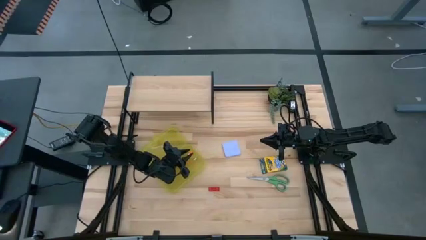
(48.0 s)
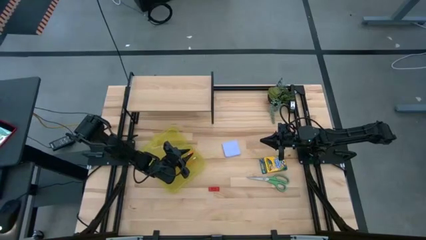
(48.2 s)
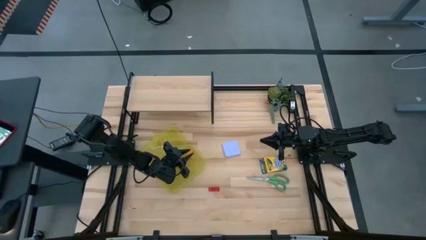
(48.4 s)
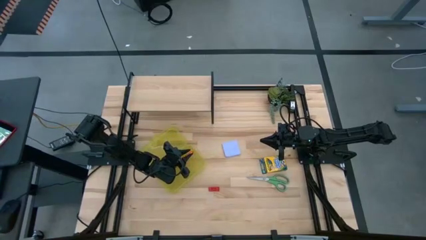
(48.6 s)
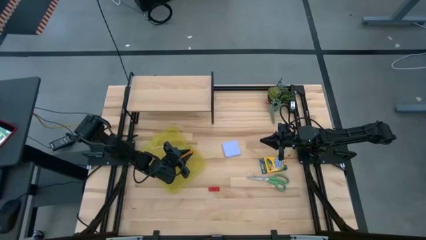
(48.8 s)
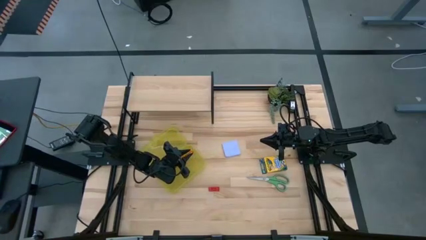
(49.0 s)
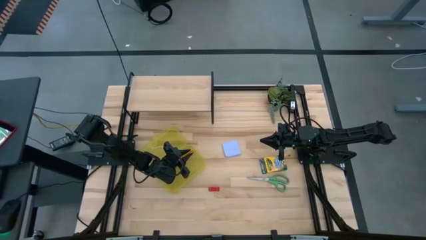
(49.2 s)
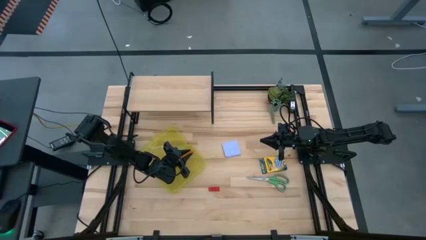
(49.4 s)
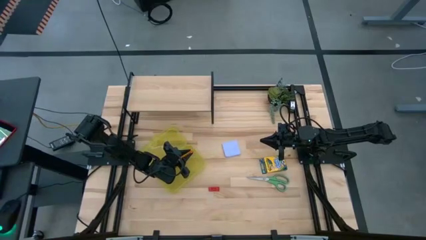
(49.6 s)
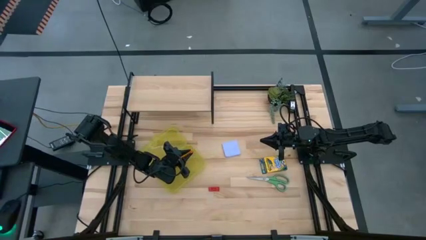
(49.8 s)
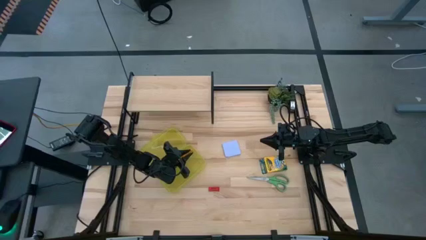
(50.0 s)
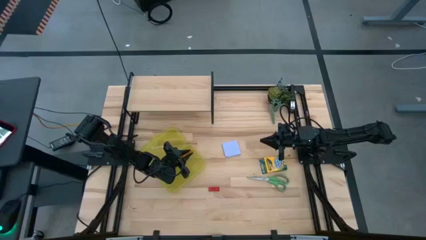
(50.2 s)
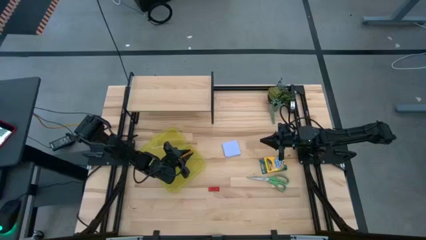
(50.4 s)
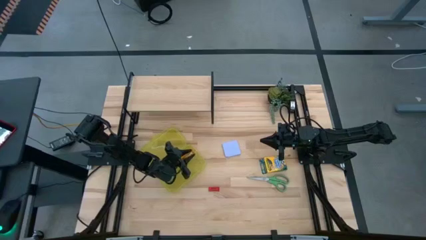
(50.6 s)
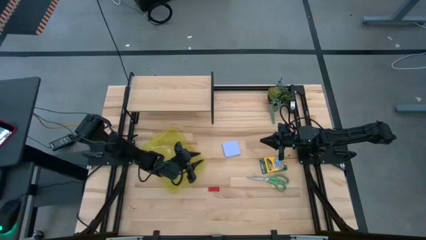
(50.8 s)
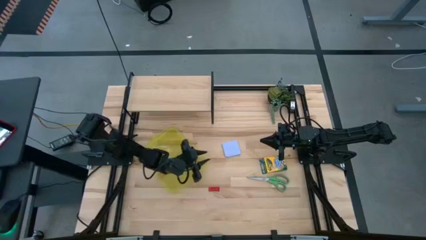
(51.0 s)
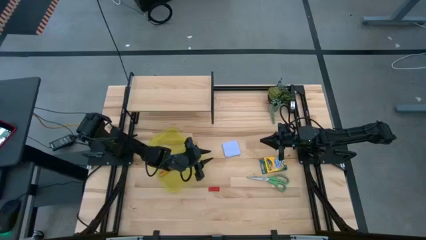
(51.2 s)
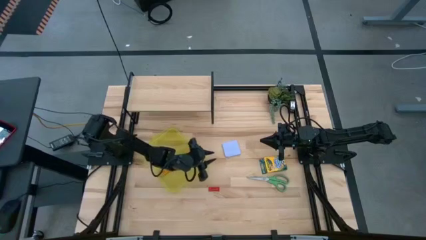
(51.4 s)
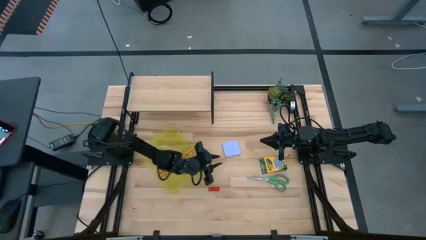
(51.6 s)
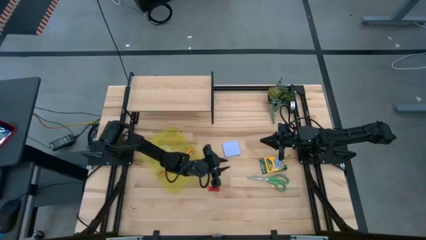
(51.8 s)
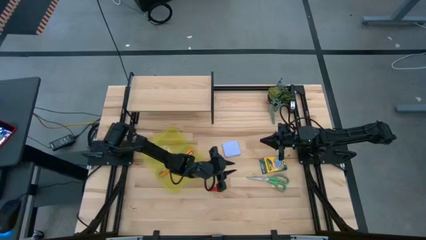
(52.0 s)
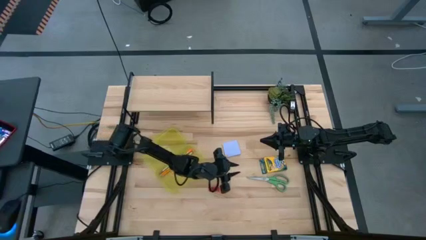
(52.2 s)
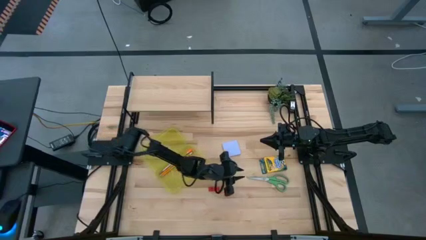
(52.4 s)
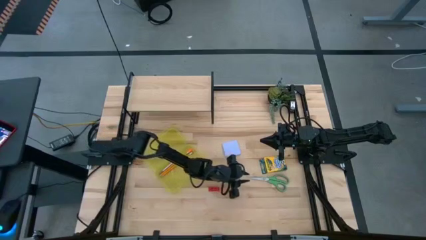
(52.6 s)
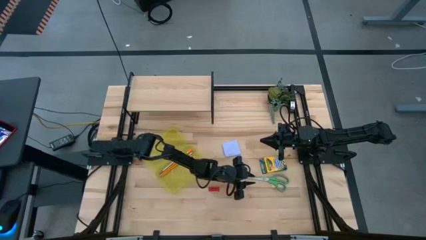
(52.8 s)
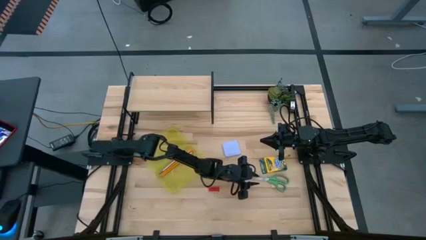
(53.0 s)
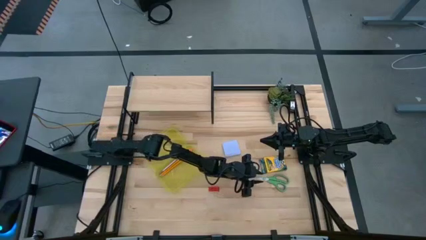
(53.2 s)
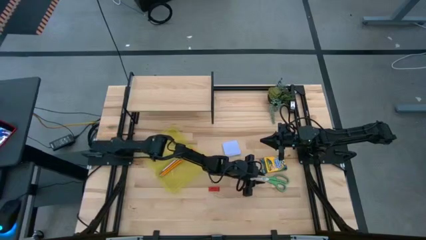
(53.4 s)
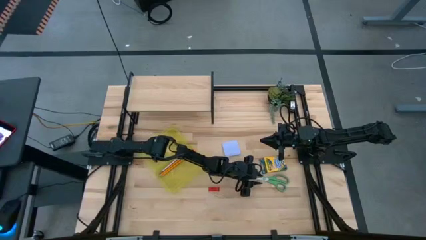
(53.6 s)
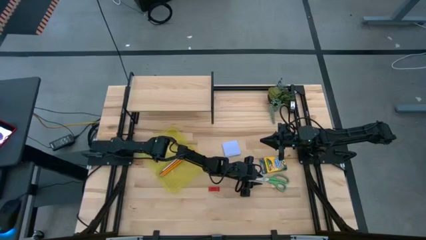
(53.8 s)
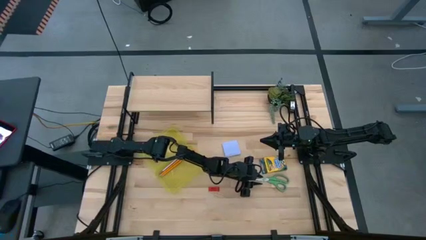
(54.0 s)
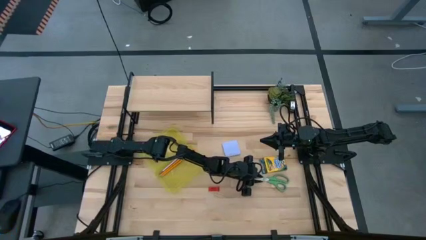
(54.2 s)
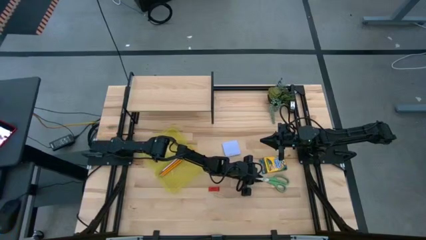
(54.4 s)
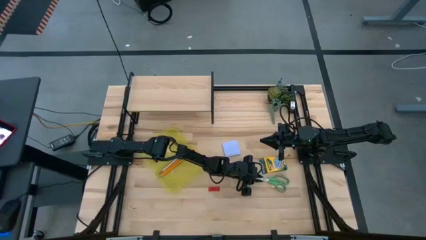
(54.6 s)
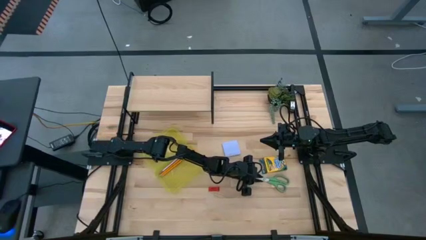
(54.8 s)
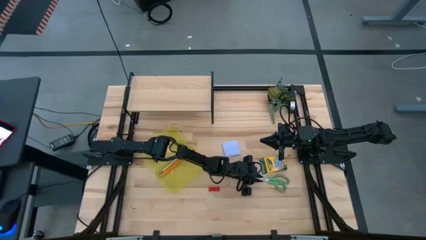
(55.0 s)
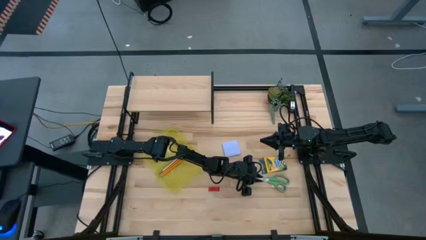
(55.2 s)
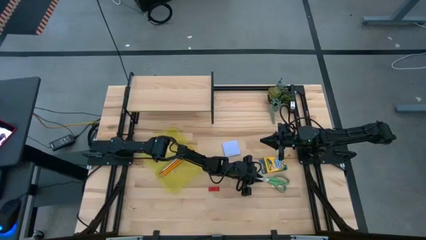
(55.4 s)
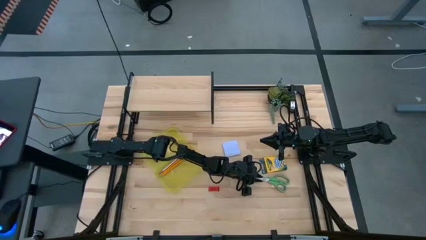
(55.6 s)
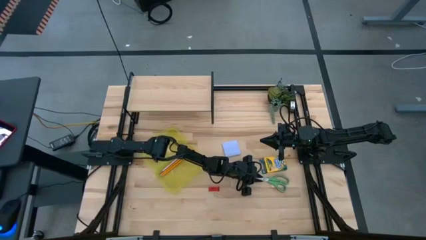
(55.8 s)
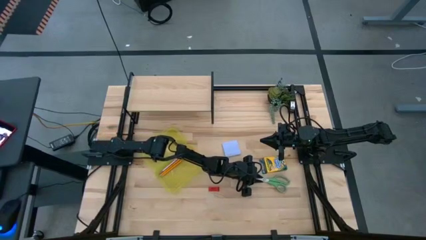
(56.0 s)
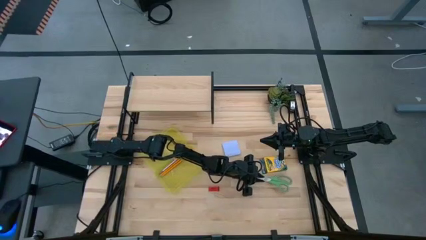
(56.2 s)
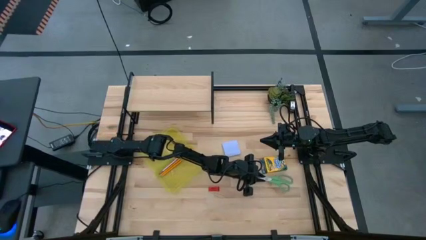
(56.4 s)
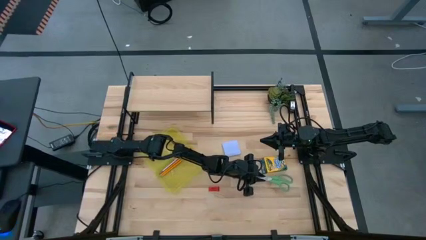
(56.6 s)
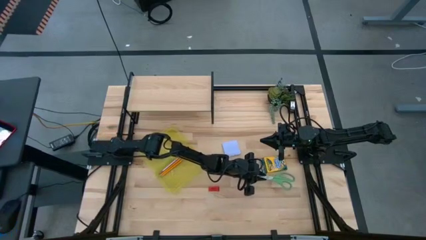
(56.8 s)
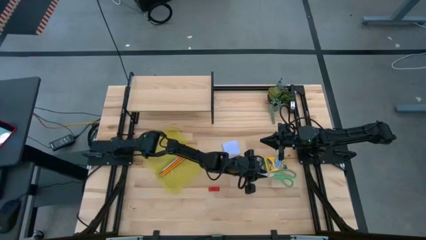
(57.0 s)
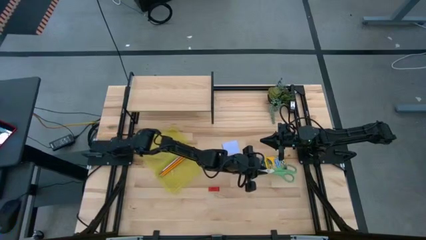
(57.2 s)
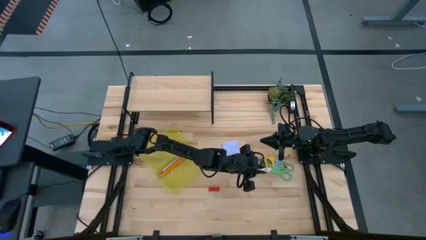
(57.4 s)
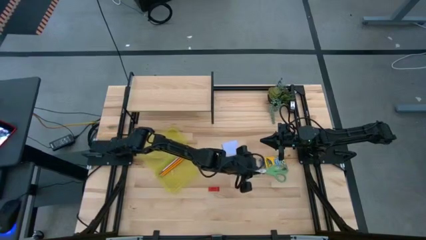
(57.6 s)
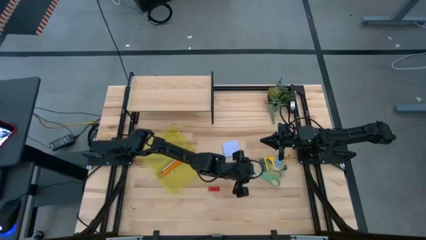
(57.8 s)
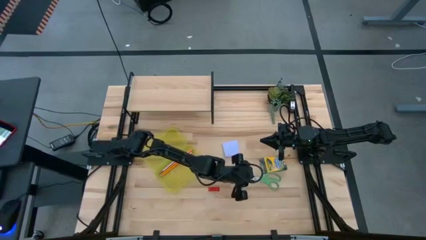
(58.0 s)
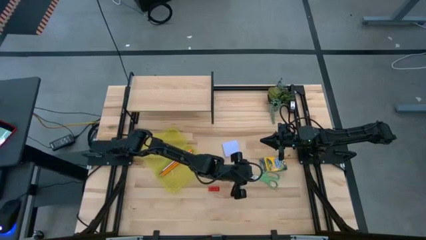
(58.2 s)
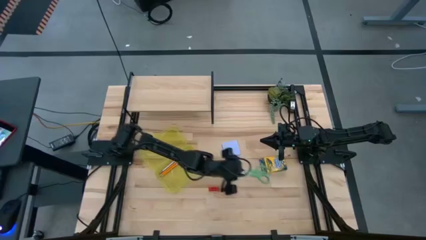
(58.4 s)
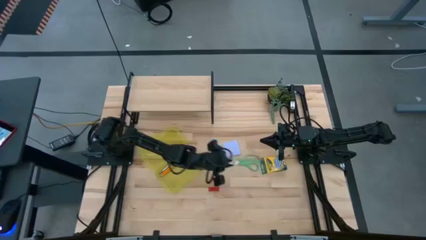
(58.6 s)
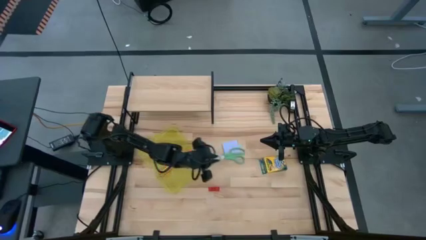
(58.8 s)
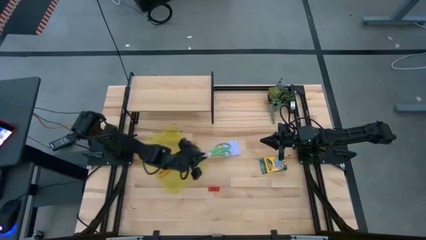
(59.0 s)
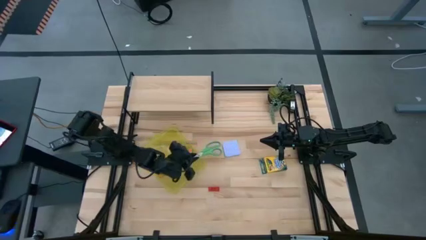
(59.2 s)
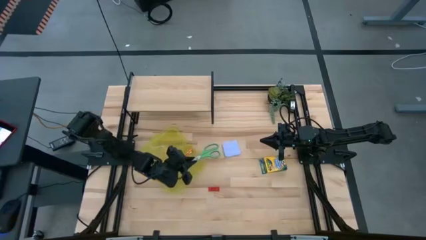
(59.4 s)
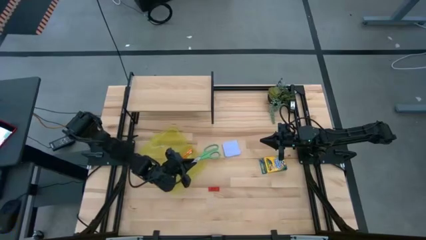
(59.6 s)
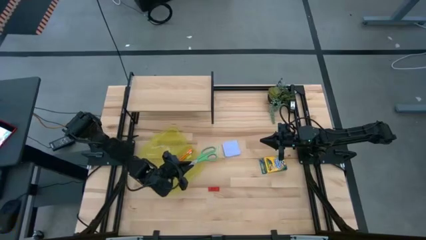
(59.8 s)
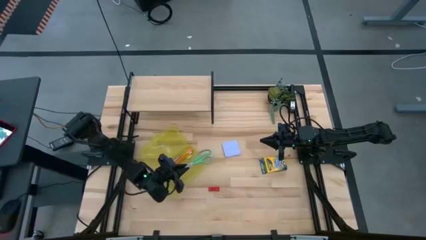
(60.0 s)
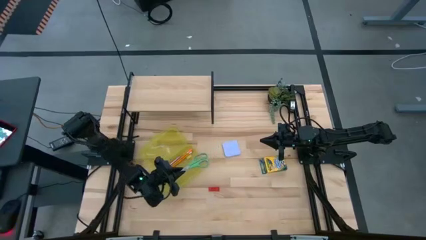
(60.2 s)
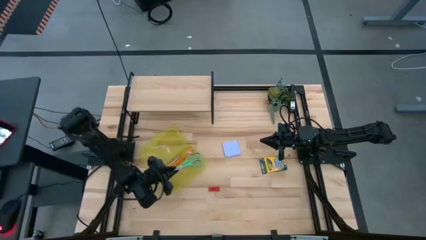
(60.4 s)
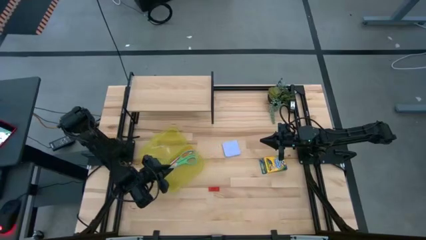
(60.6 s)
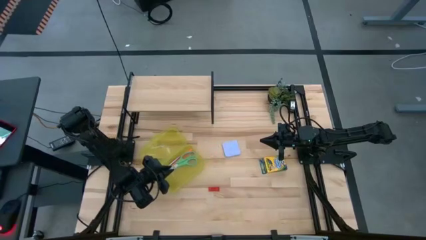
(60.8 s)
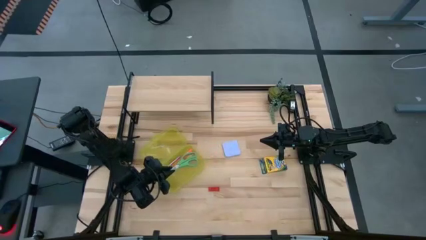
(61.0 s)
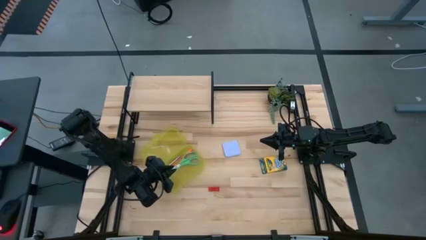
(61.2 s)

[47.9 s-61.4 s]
Task: Pack school essentials
Put the green scissors into the yellow supply box
